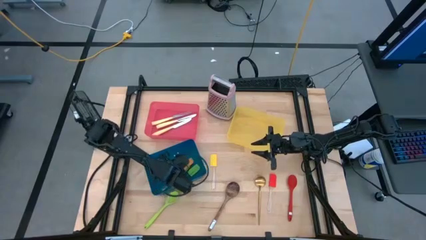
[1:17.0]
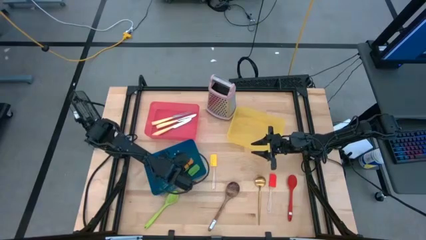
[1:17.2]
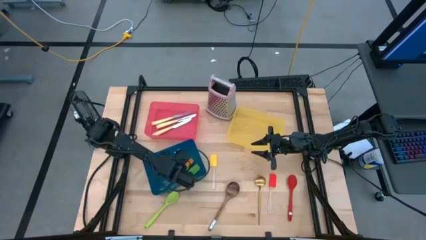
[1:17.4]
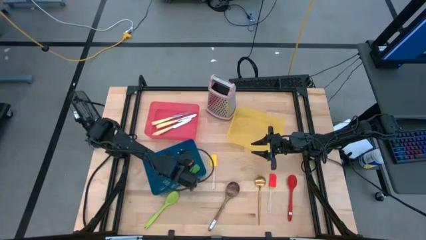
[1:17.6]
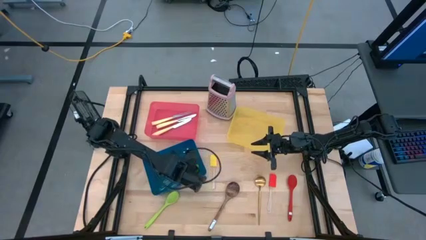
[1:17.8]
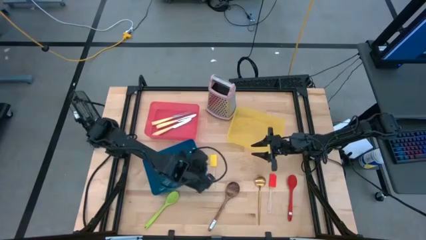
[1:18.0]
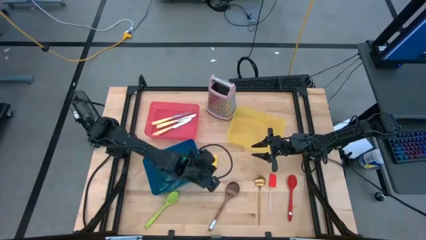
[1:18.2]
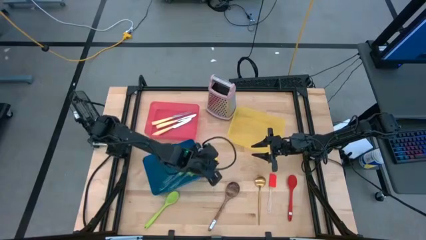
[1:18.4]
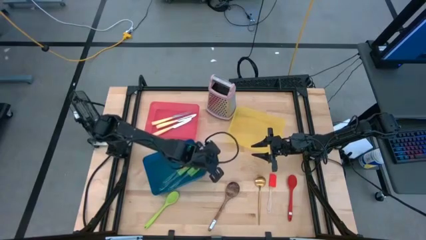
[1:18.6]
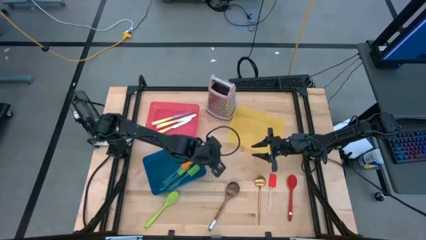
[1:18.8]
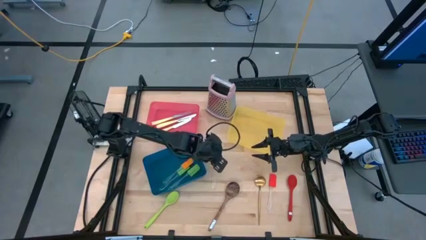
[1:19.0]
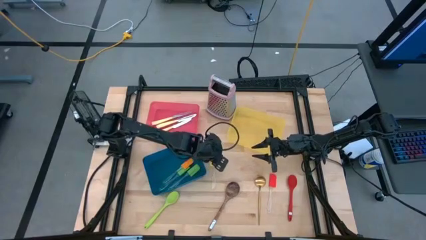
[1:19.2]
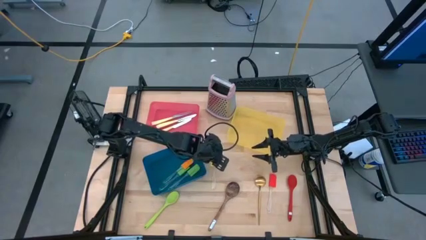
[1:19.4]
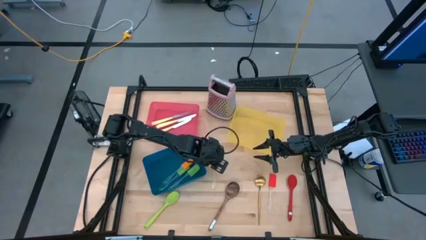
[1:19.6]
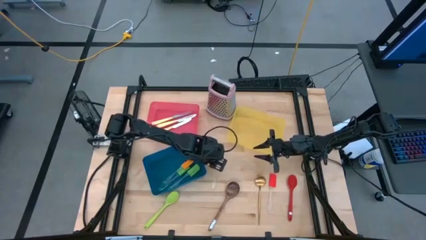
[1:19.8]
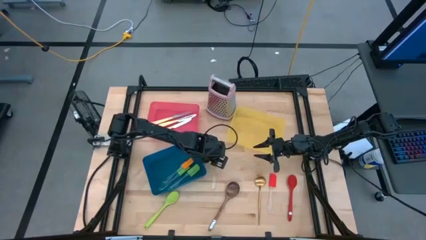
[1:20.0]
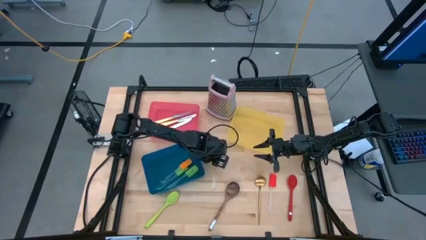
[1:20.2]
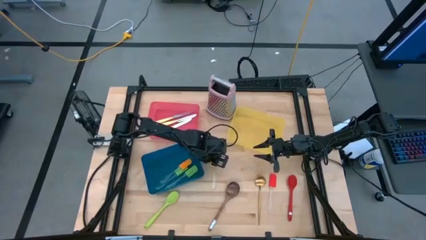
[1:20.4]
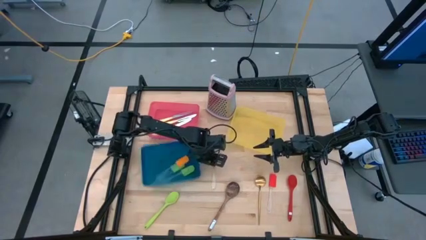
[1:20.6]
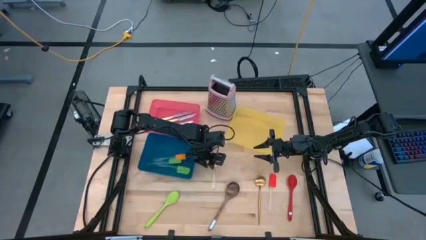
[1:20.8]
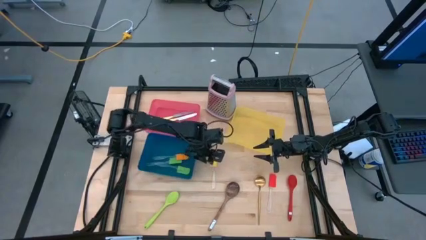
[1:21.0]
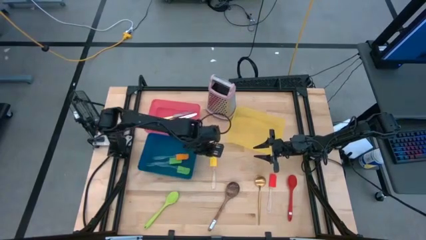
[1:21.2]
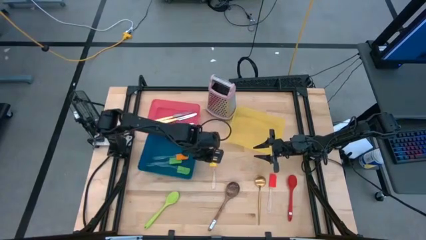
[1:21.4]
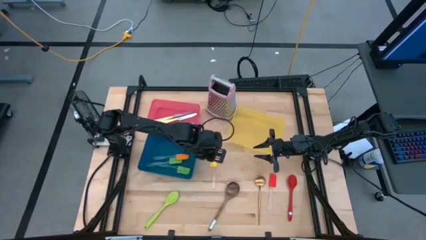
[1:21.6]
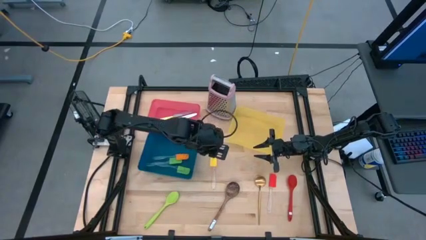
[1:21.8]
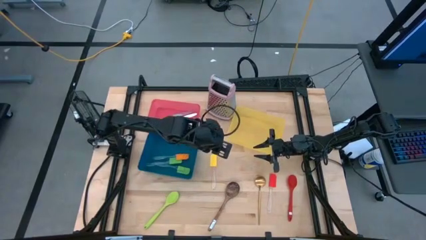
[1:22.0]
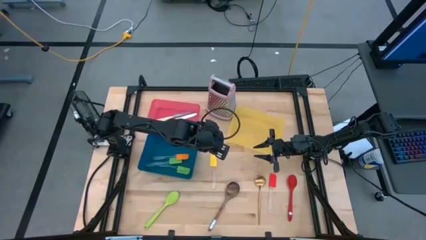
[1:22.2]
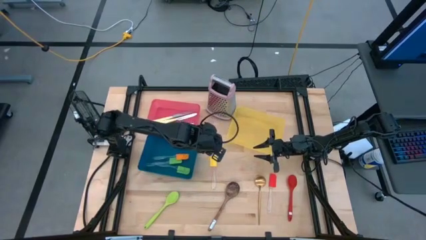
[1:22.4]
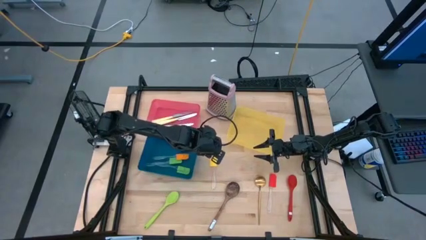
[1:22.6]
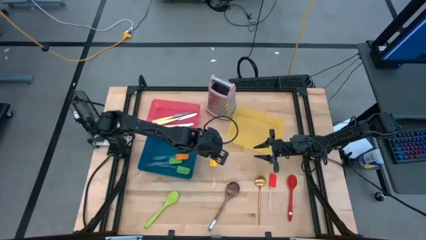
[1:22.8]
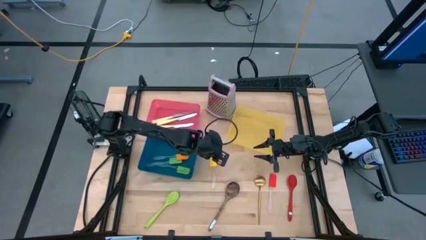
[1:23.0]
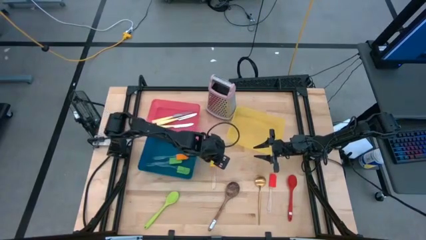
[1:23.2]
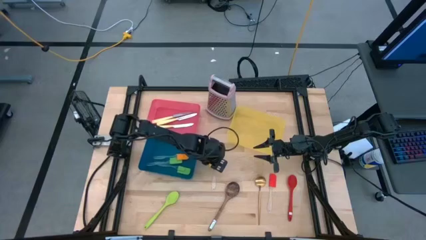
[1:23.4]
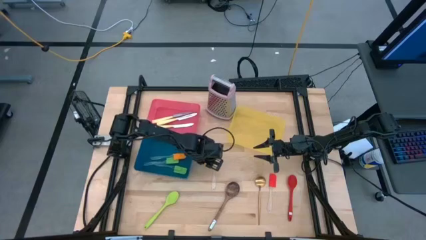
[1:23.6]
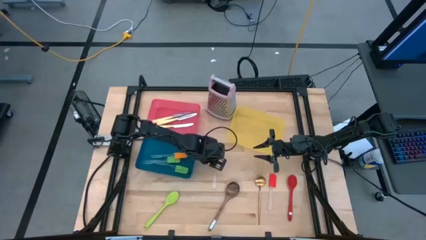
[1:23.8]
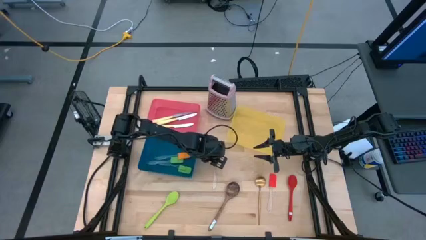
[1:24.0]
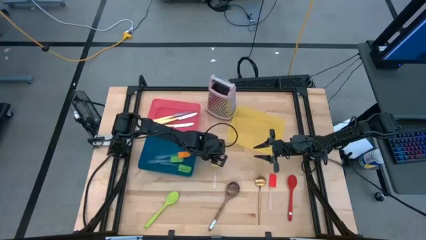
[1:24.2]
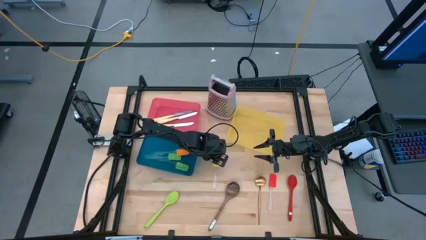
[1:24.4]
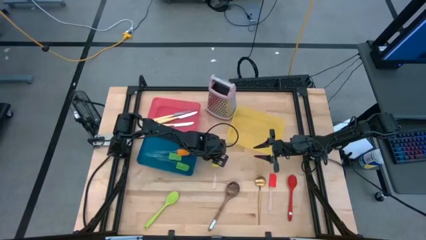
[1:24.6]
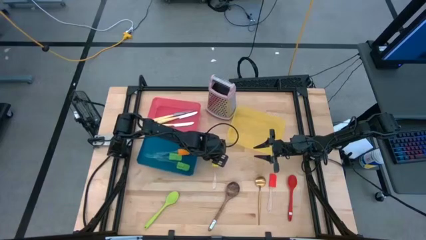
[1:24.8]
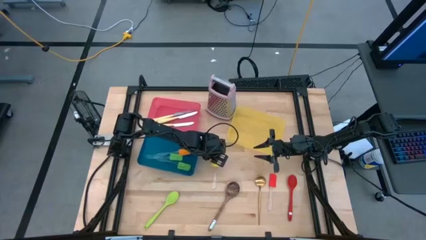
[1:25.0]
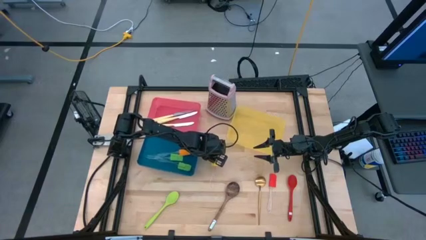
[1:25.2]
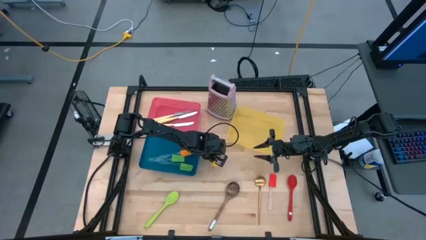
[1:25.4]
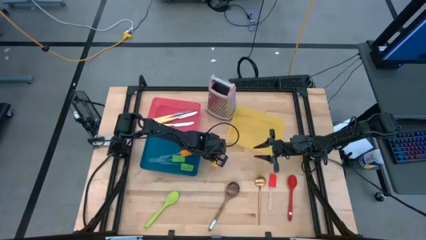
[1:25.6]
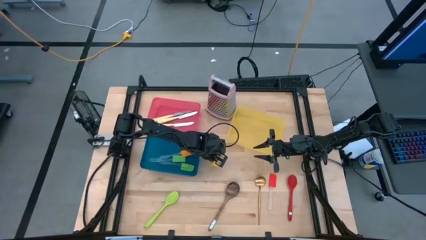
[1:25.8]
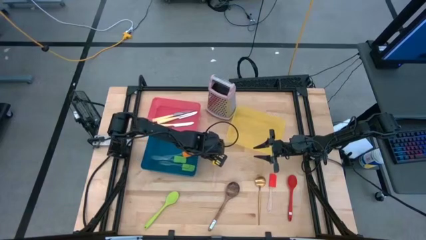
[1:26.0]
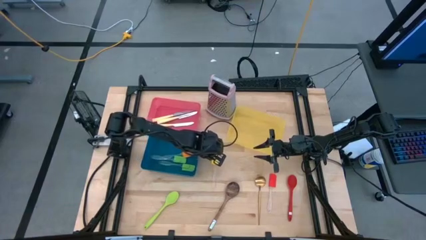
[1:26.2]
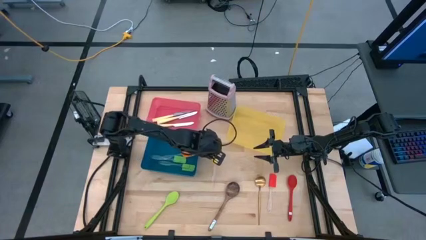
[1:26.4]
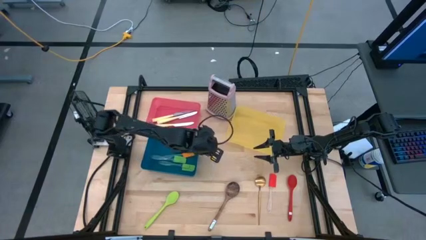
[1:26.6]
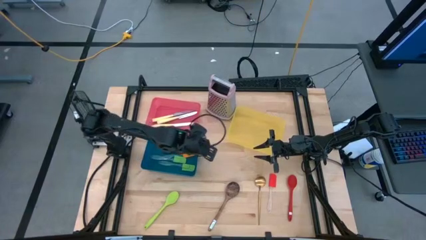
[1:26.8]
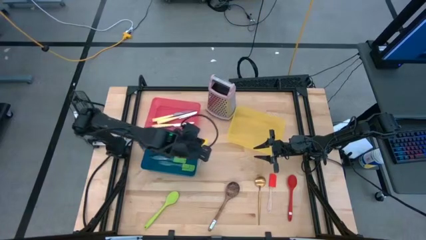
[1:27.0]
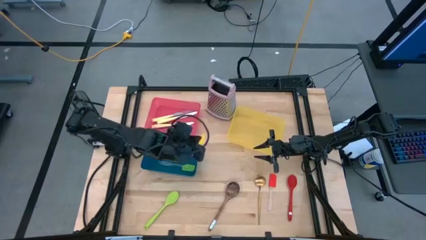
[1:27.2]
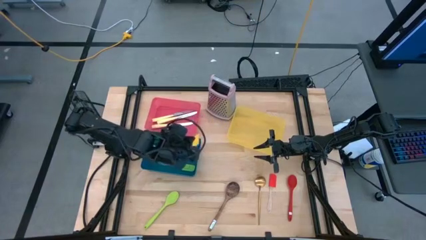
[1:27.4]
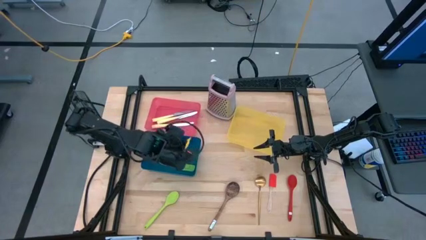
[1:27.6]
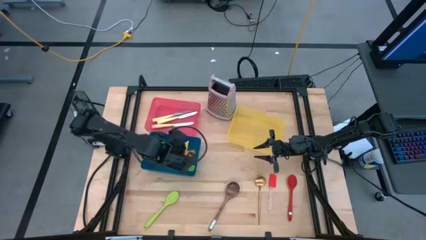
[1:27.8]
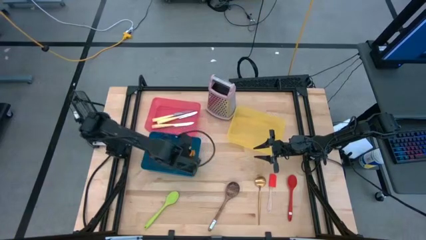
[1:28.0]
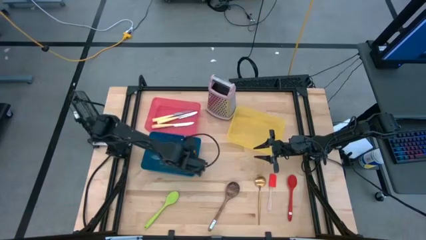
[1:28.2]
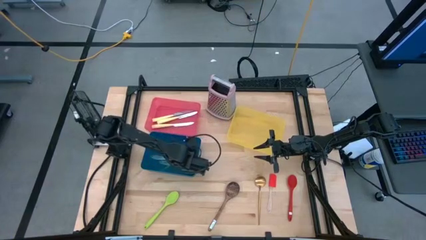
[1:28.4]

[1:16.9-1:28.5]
Task: Pick & Place Kitchen Items
Put the yellow spatula into the blue bin

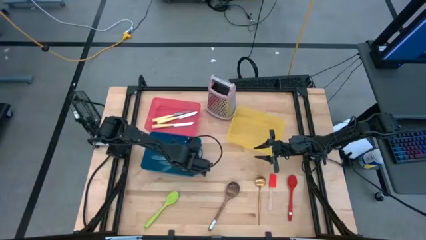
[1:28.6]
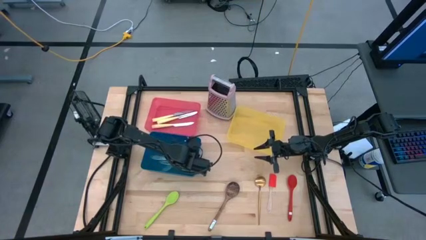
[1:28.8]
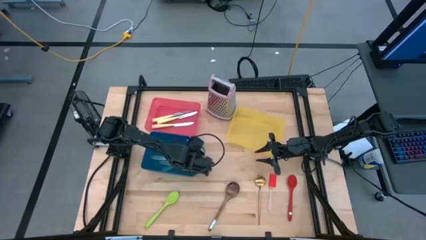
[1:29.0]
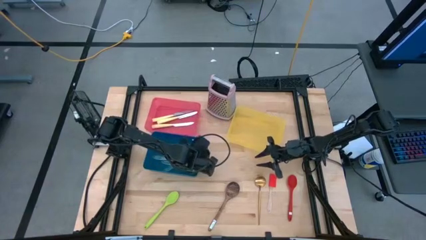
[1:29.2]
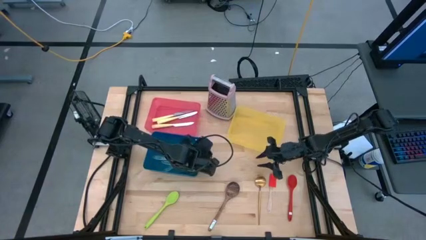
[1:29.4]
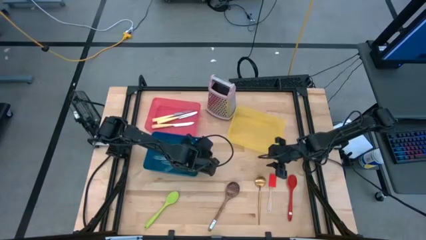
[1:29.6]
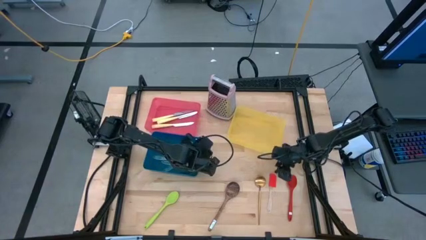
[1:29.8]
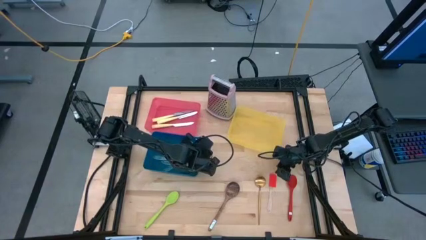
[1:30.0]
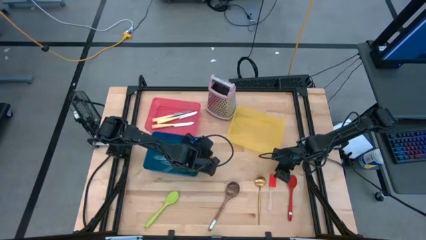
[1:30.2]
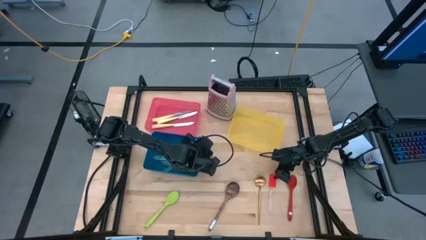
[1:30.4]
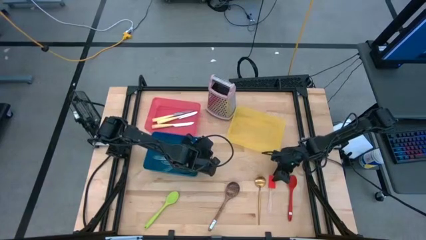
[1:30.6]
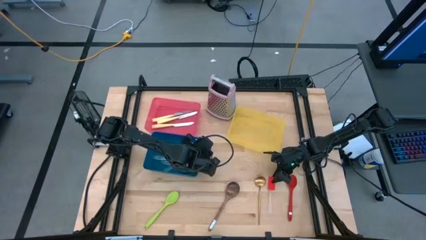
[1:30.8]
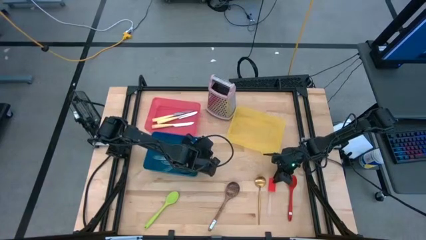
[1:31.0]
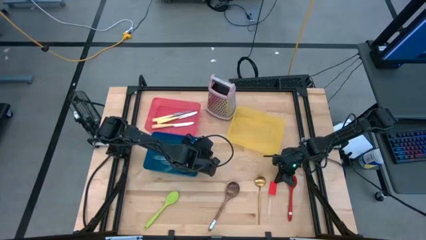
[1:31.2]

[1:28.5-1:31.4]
Put the red spatula into the blue bin

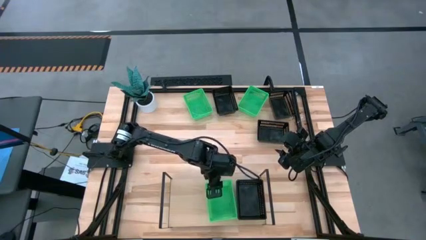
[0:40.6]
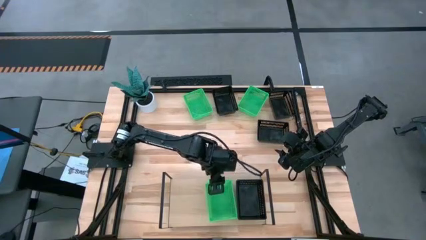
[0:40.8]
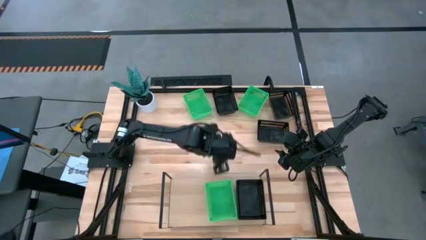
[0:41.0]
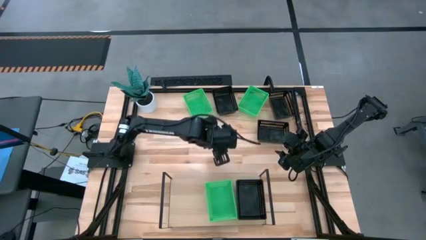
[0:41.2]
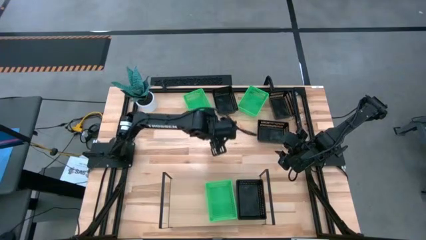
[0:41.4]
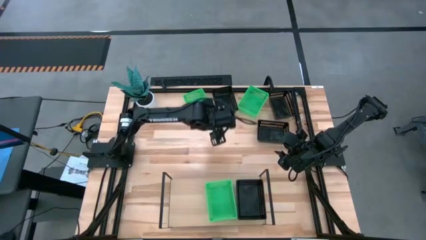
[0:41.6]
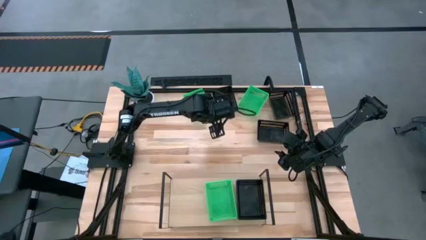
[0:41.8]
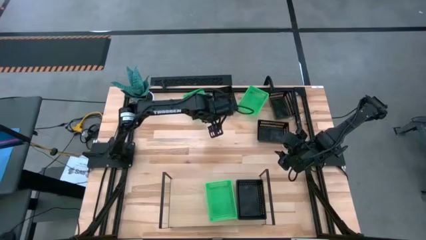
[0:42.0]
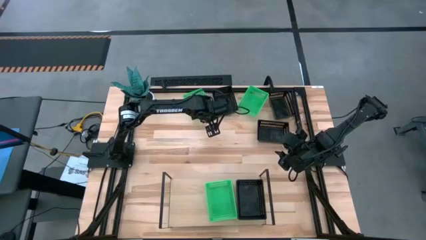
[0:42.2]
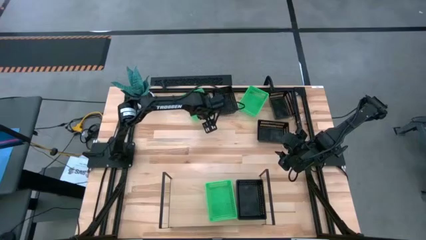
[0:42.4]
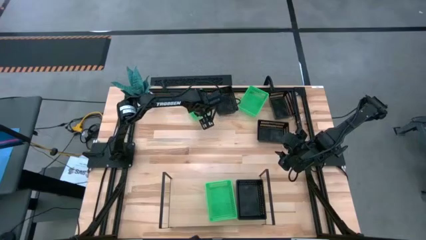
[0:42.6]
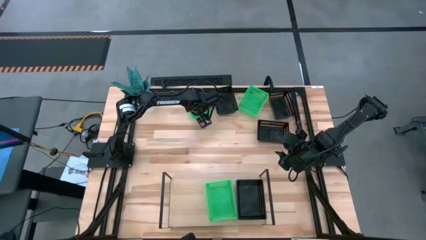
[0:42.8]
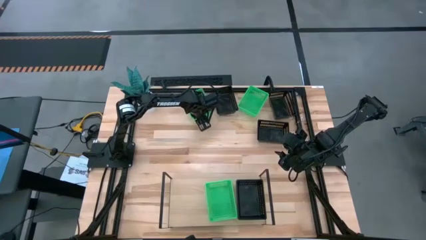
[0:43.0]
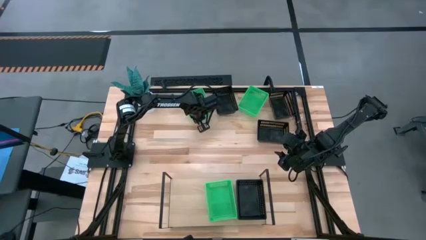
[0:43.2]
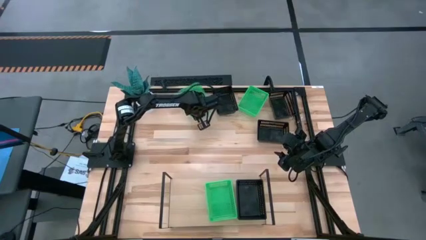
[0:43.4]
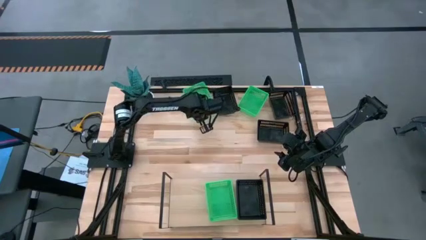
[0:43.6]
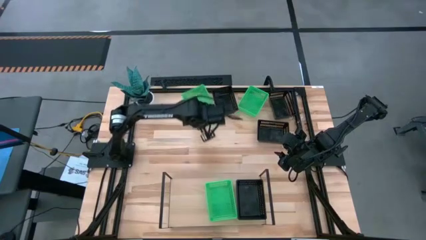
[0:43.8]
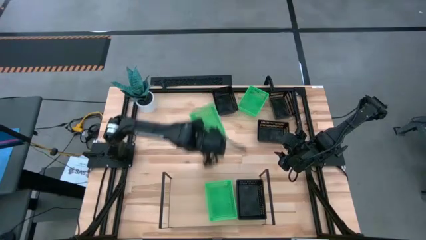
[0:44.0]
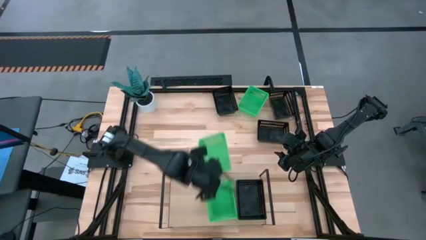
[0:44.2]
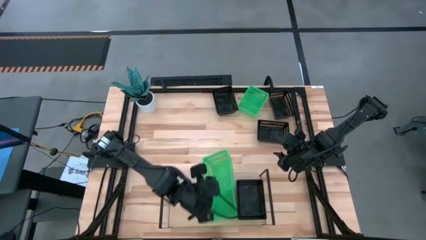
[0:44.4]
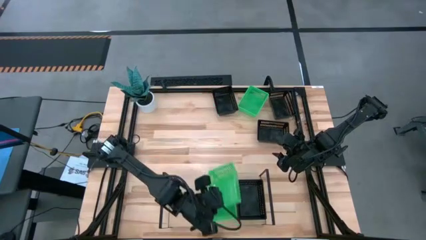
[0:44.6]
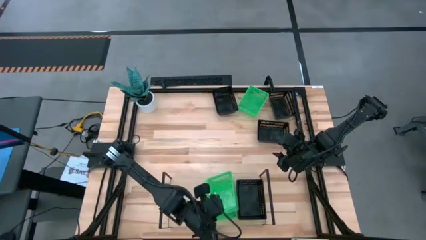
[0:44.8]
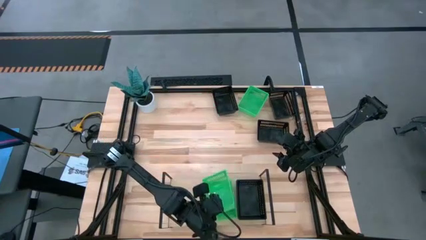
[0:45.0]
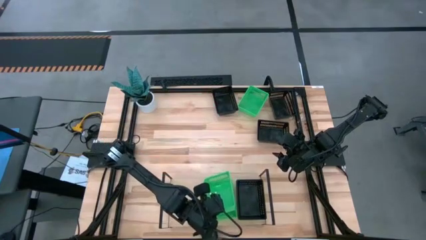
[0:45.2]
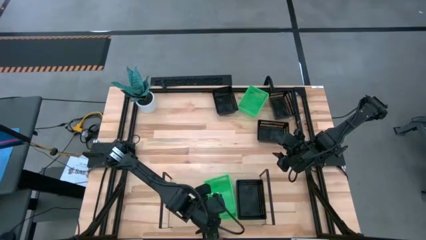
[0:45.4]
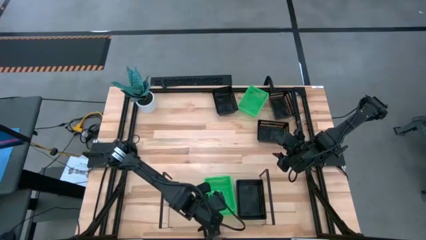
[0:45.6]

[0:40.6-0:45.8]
Task: Stack baskets on shelf by color
Stack the left green bin on top of the green bin on the shelf
